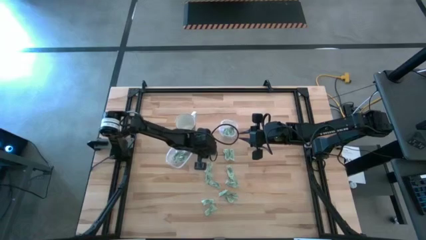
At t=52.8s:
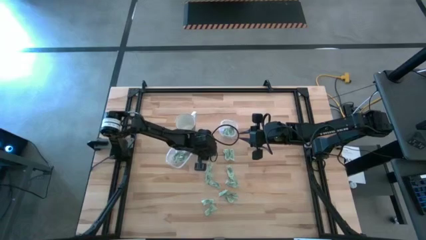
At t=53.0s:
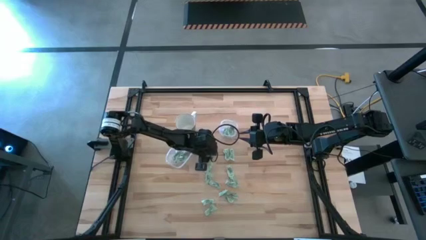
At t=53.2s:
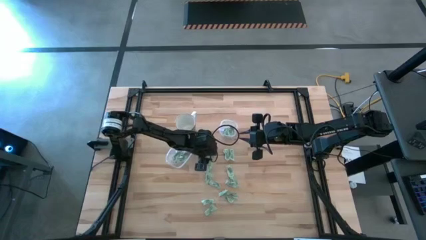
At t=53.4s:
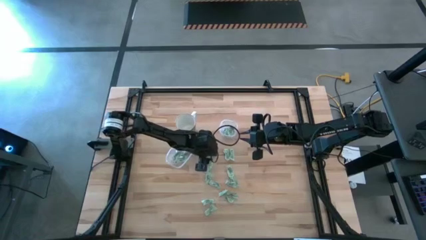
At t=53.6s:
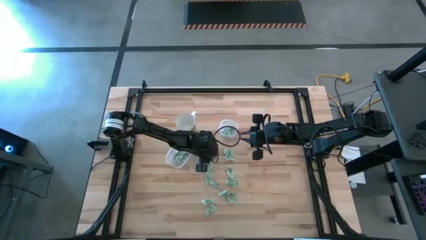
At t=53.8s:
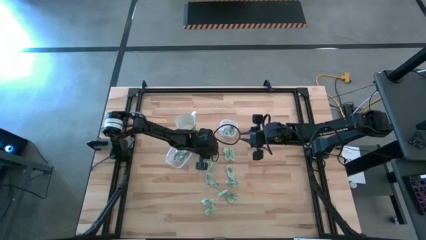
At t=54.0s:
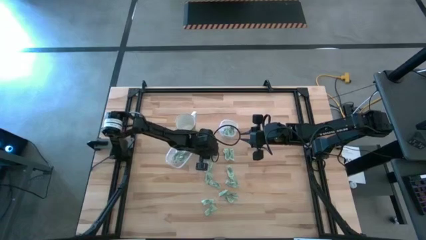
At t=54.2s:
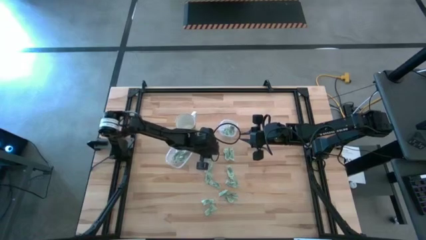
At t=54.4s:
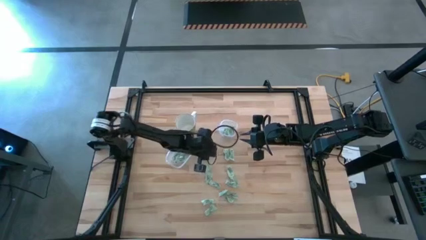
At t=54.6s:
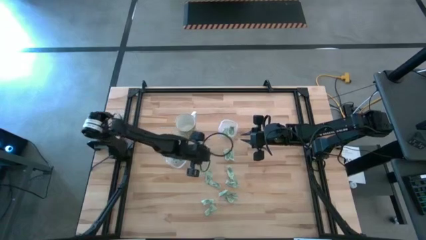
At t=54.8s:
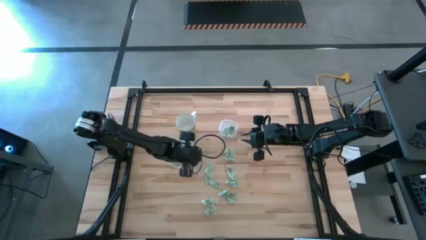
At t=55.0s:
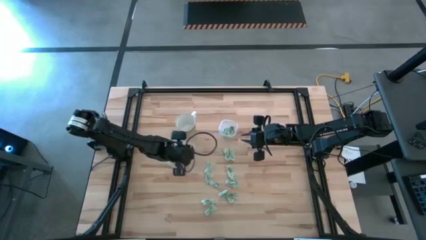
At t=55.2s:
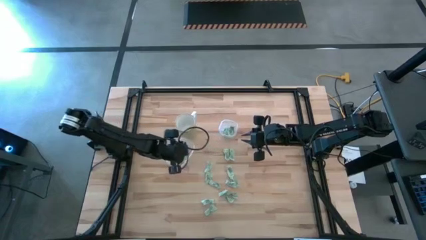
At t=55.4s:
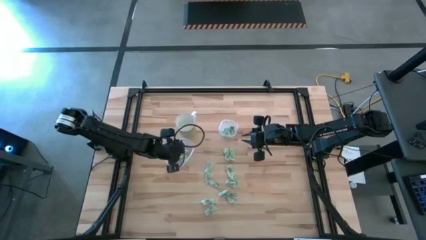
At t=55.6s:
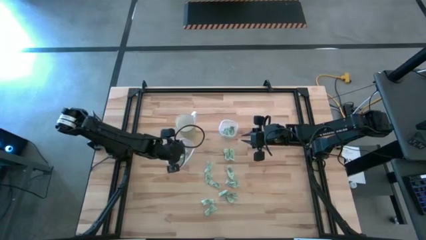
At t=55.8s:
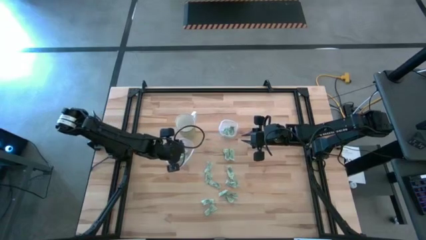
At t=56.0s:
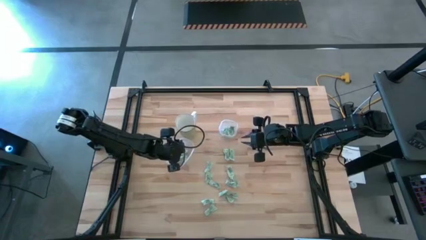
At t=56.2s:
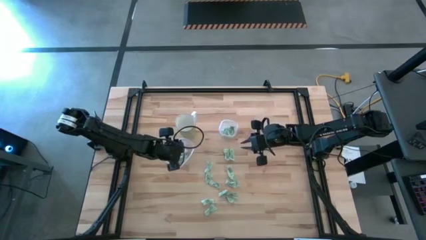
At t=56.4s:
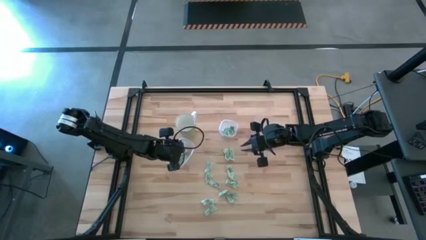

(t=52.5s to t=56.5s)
Task: Pick and place items into bin
Put the stevia packet into the bottom transparent bin

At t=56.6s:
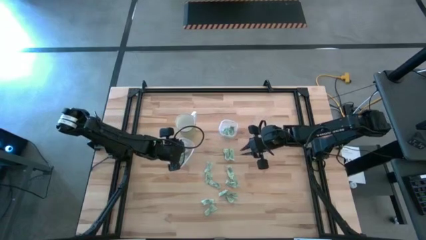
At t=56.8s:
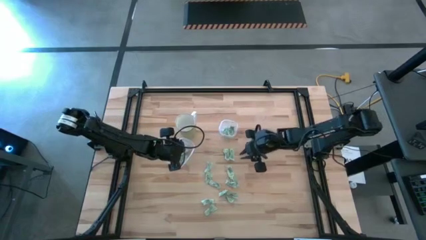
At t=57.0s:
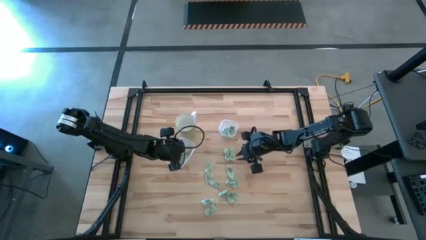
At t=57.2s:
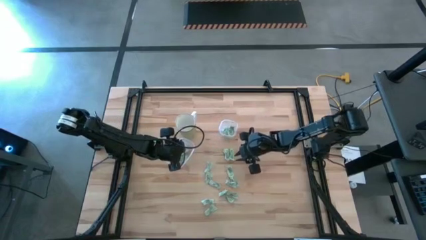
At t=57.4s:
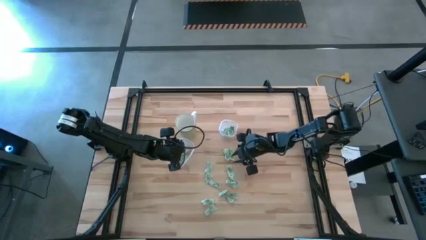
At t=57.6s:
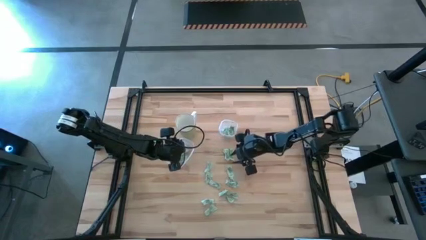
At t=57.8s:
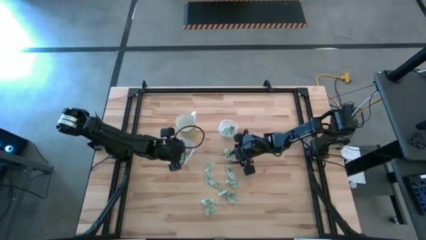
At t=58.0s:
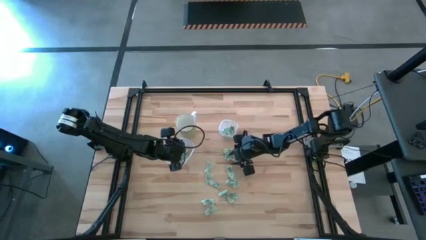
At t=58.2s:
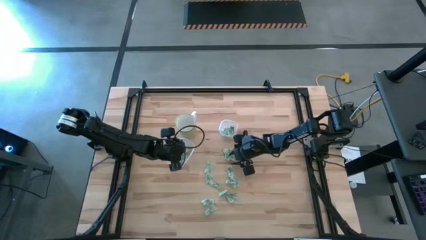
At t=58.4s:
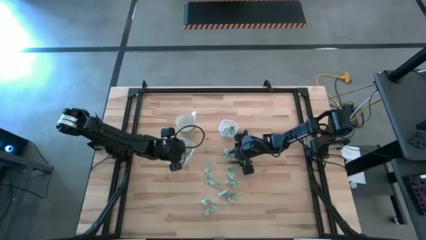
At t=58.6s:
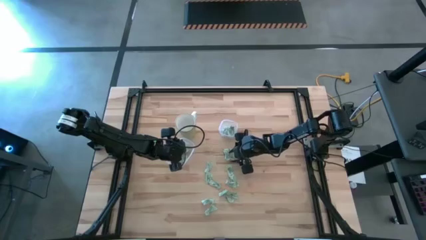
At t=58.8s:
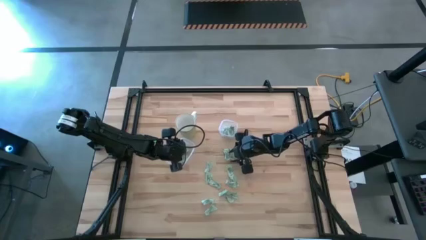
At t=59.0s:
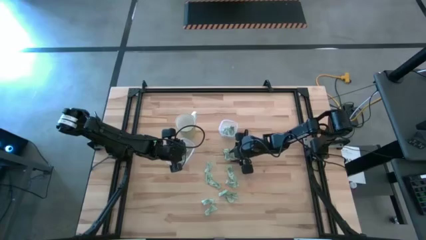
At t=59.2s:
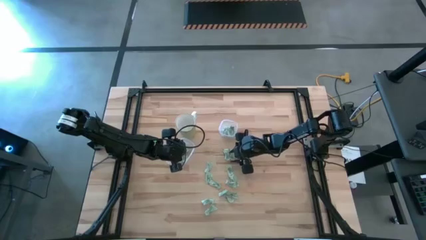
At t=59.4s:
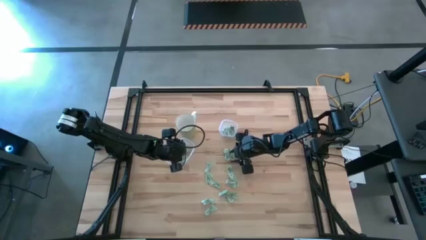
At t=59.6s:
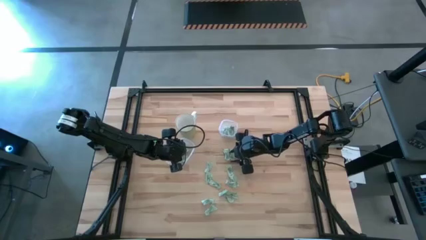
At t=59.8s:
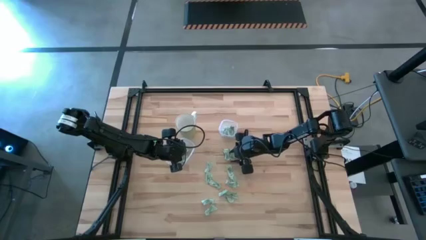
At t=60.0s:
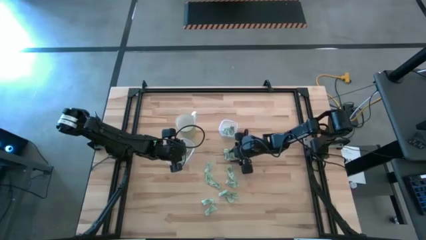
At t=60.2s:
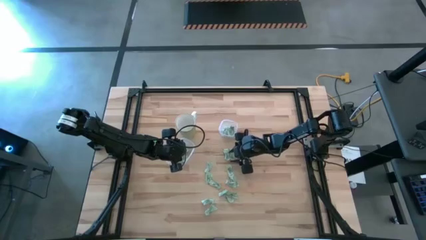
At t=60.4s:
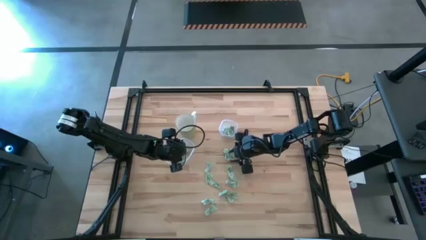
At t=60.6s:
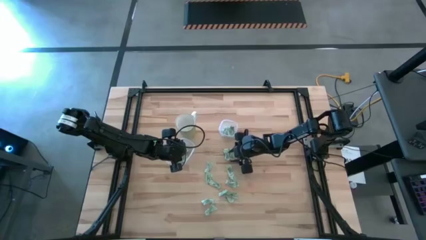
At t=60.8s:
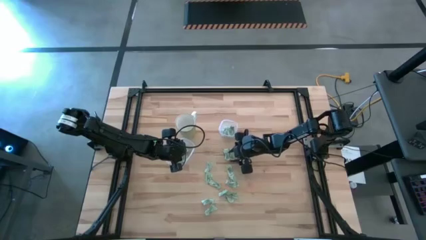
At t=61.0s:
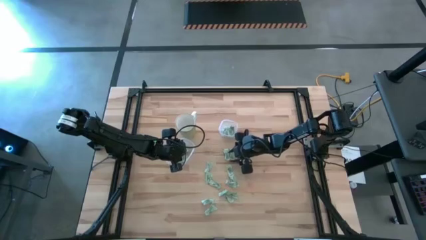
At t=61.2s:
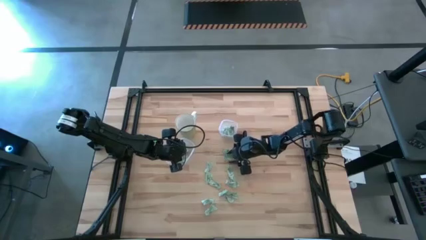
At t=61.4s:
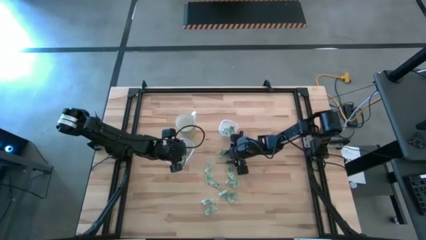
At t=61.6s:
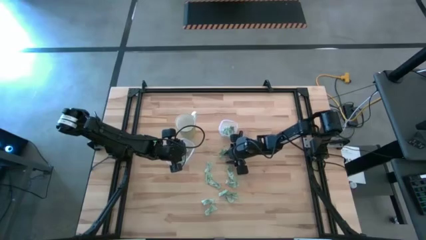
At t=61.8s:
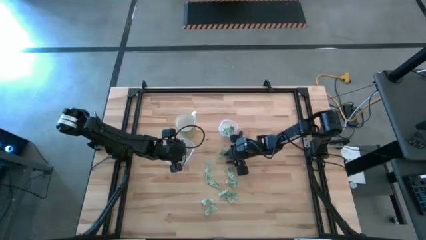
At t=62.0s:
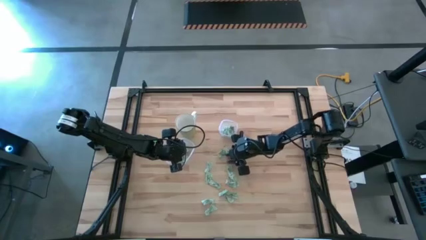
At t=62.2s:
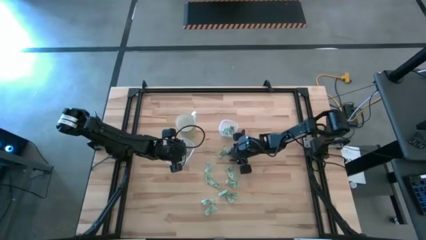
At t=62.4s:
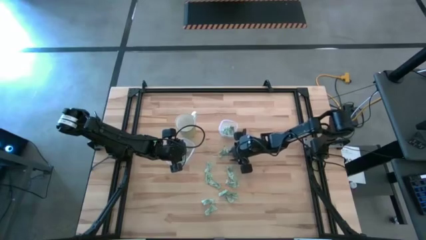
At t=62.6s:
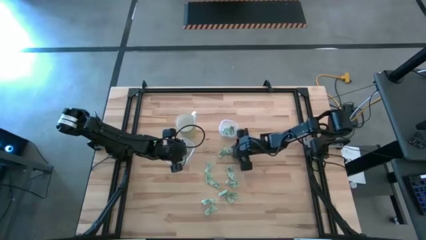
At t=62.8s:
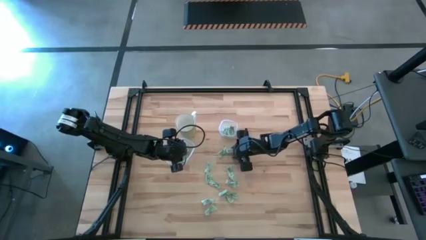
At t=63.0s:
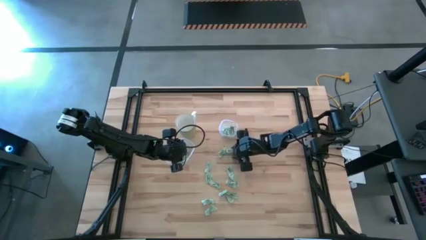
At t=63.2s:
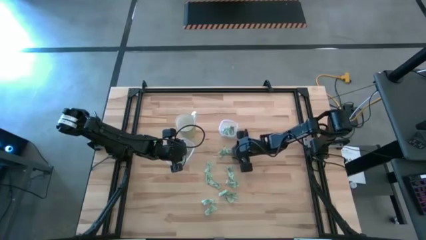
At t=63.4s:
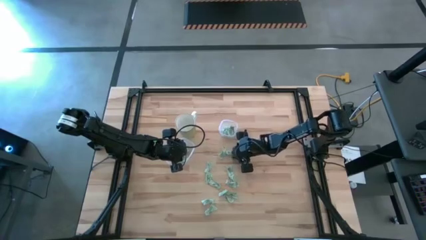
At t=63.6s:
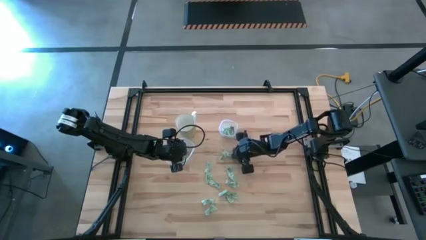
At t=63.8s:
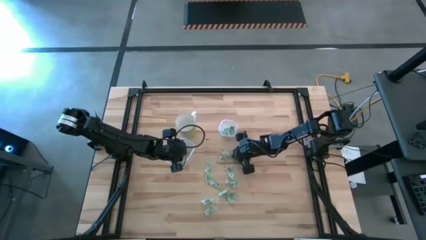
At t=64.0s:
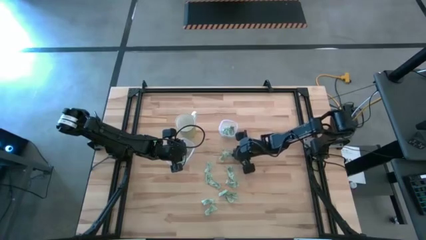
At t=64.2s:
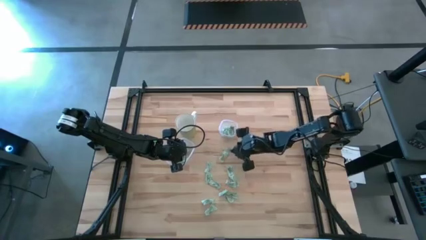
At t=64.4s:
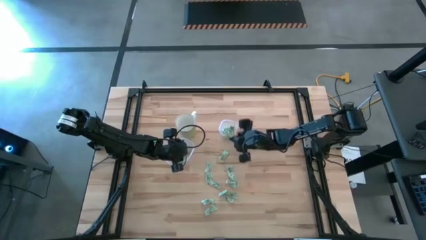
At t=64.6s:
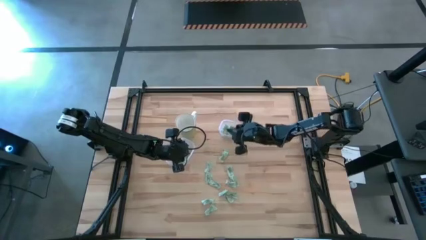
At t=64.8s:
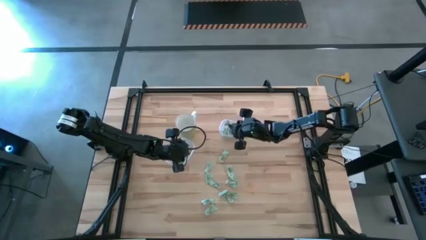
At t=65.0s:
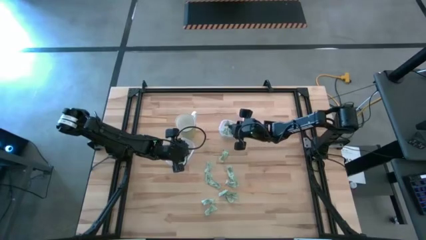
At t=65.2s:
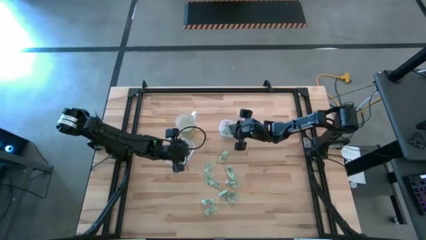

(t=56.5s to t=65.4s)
Put the stevia packet into the top transparent bin

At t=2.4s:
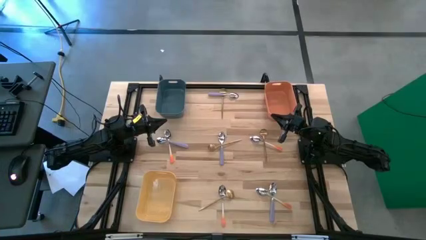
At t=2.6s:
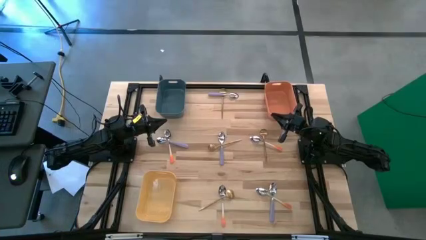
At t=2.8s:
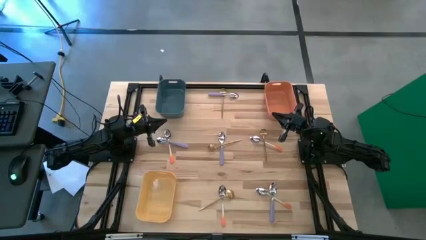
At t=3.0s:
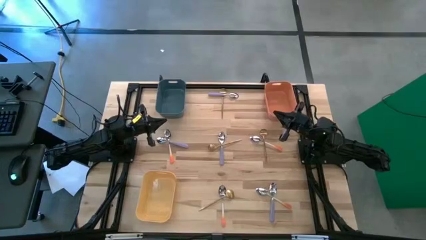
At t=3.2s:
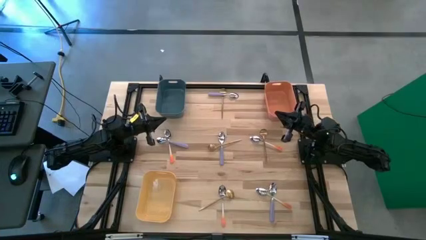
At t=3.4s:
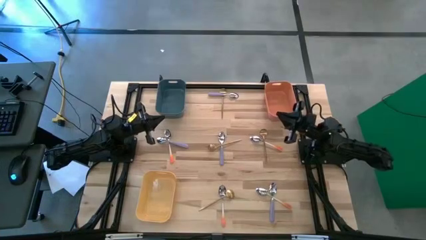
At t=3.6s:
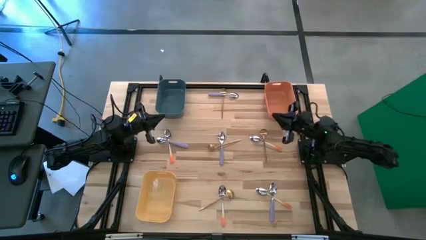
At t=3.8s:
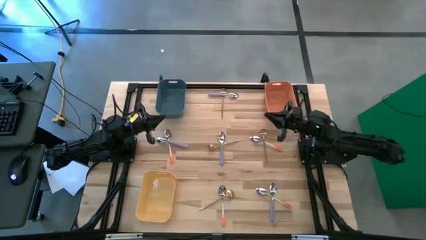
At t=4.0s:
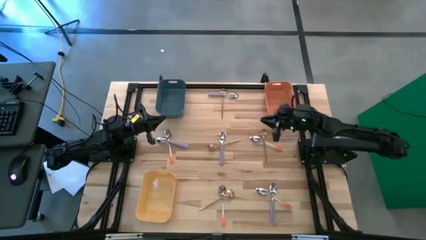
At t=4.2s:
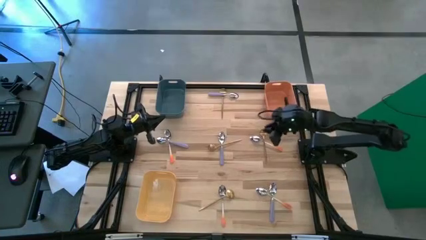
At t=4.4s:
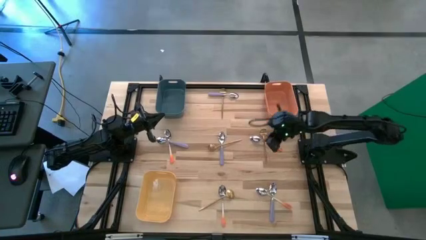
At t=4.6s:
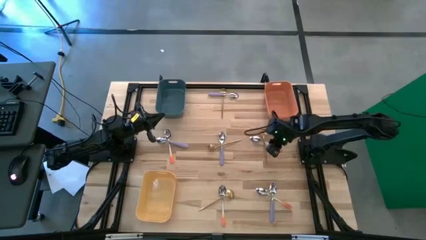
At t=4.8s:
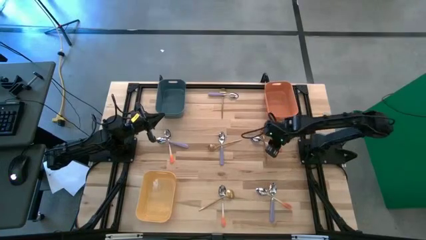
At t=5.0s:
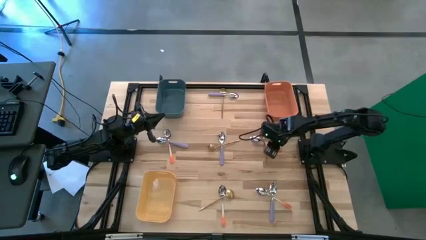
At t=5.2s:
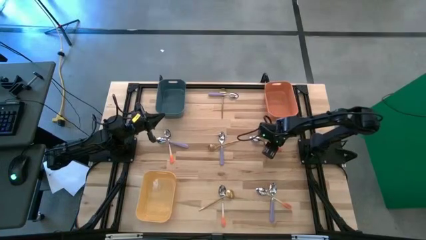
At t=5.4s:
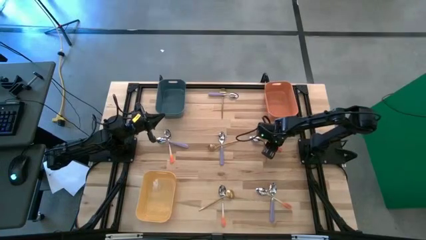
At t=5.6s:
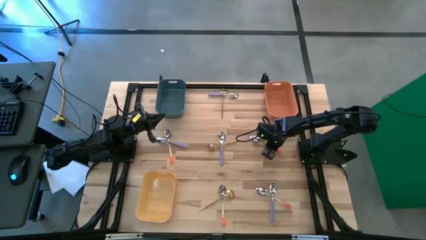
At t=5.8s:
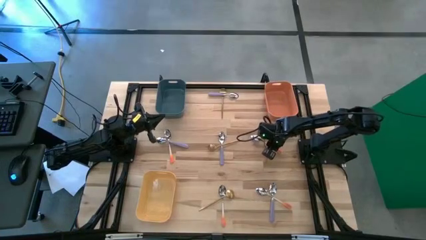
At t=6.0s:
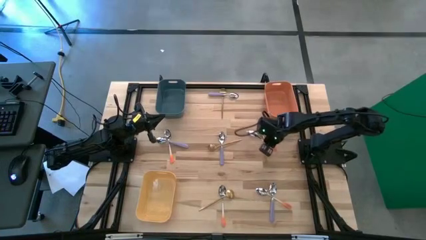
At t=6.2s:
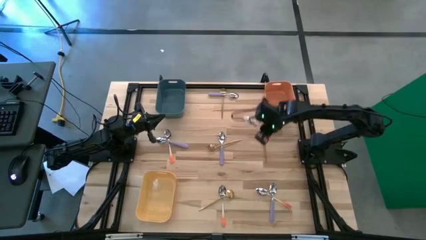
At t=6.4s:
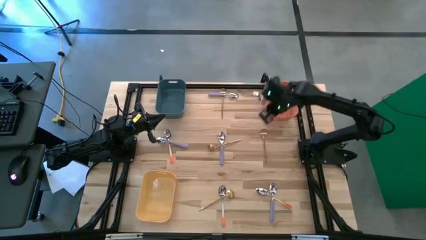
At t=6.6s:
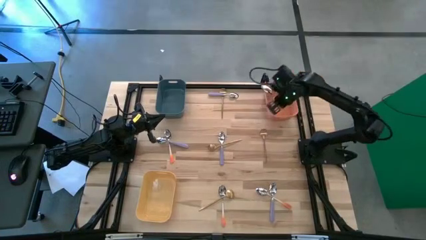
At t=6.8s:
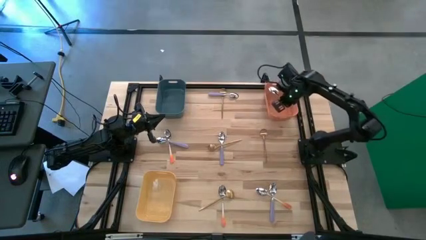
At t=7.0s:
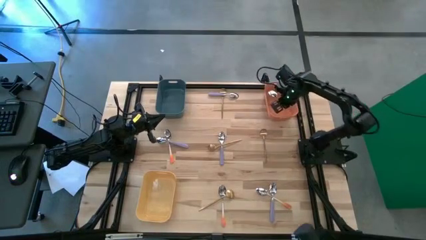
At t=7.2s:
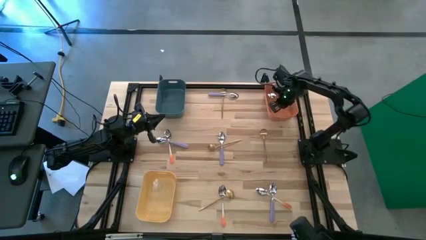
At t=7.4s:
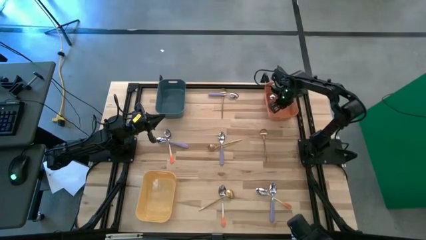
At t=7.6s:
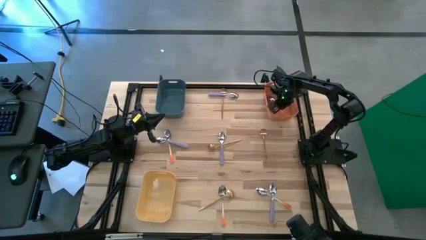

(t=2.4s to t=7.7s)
Task: Sort silverware by color (type)
Put the middle right orange spoon into the orange bin
